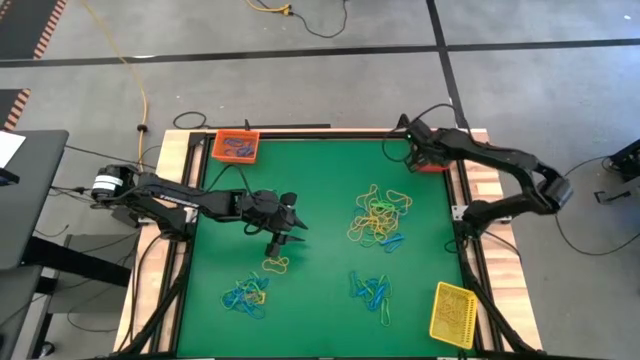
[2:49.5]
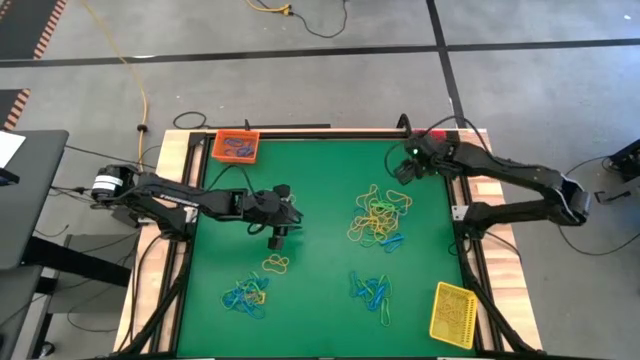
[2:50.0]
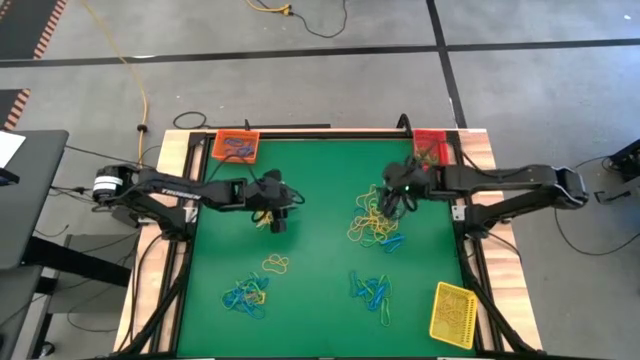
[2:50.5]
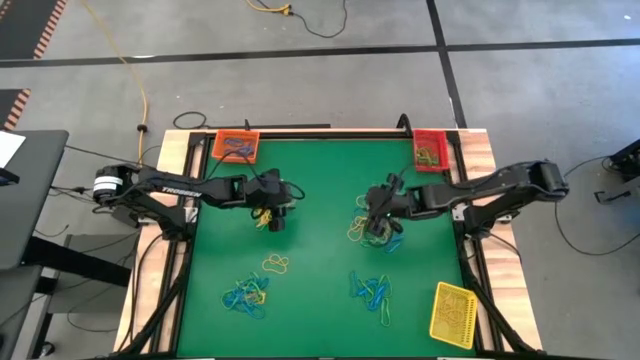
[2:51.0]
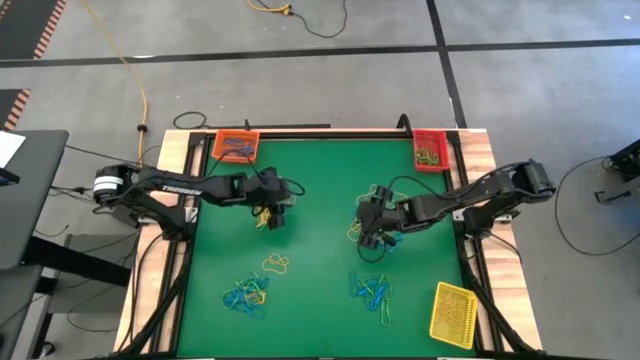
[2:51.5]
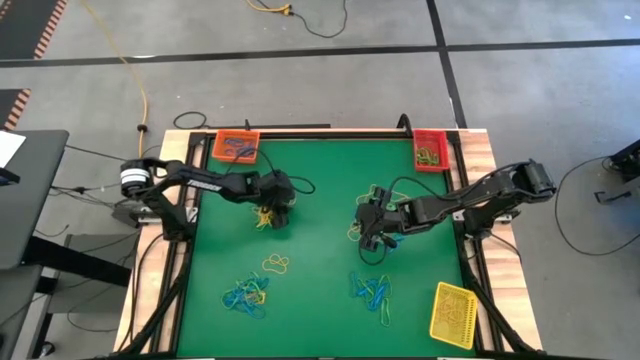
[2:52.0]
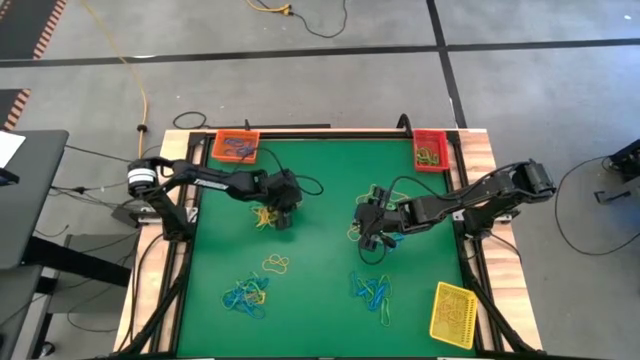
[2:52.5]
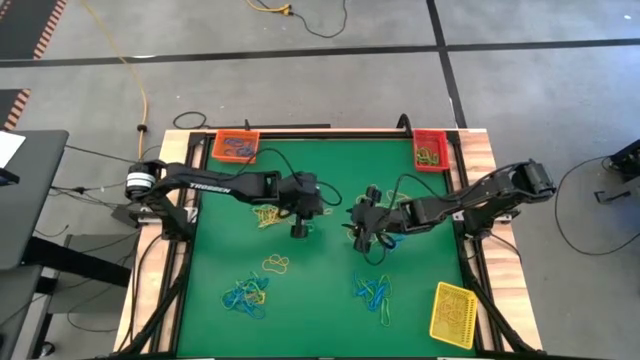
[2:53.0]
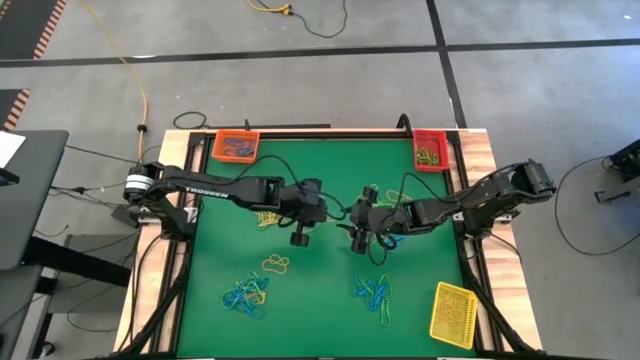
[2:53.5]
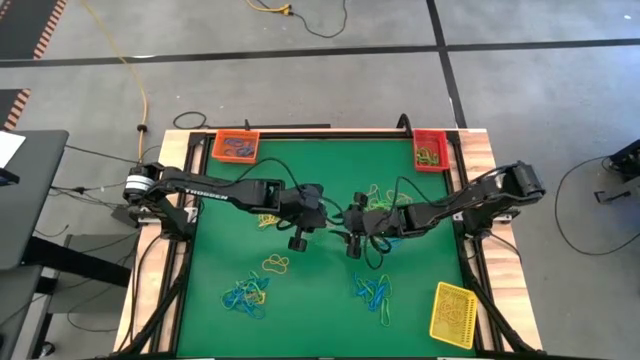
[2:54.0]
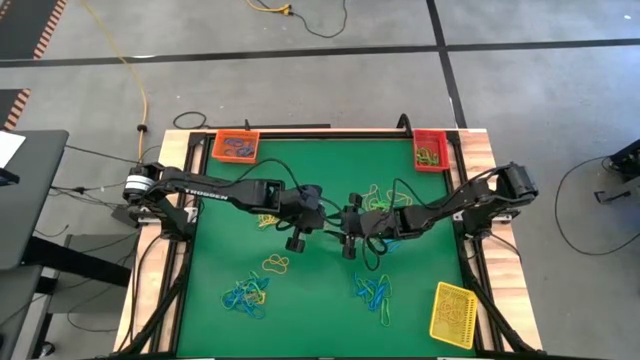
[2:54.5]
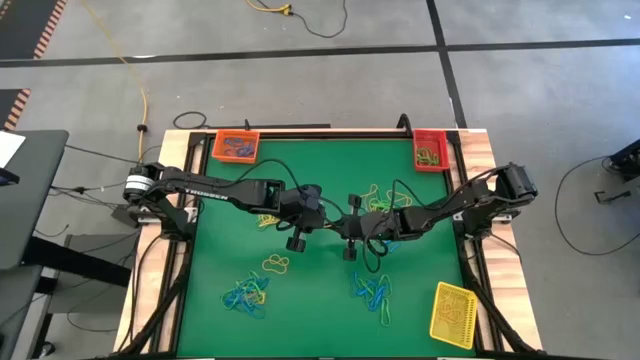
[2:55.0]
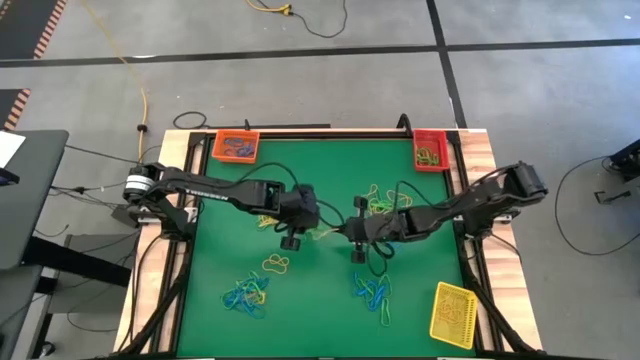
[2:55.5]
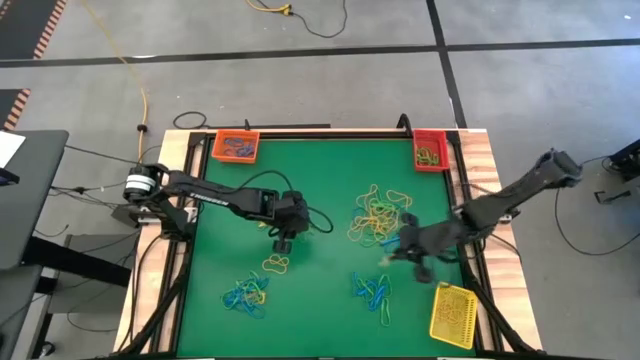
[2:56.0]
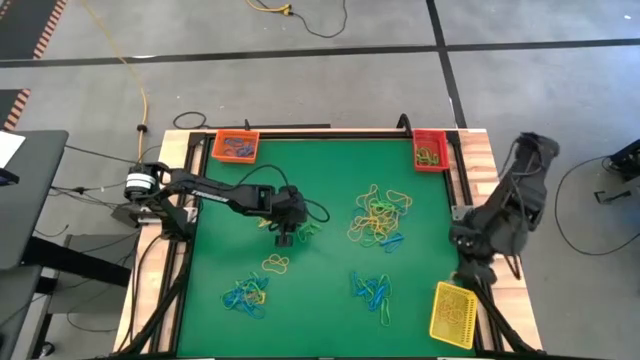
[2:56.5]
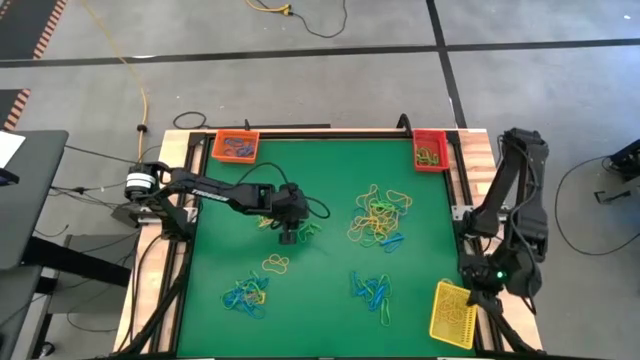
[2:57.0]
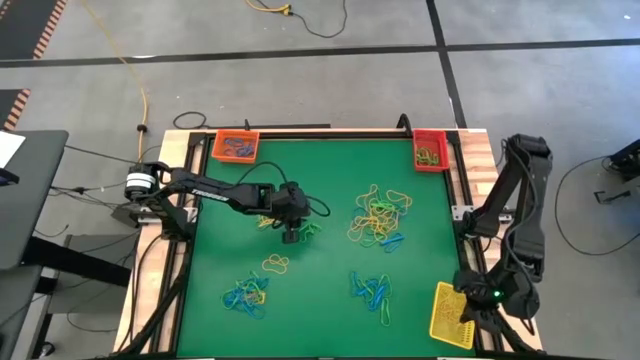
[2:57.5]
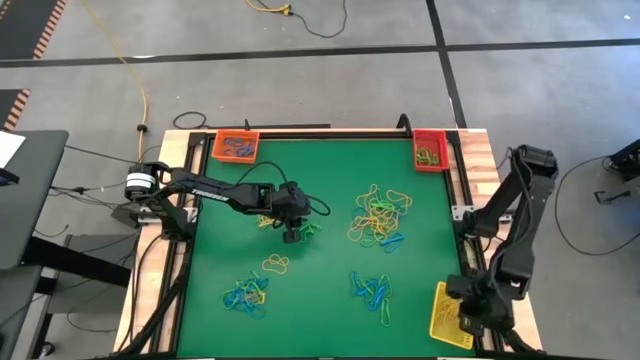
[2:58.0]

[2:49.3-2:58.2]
Task: Sort rubber bands into baskets
Put the top left yellow rubber band into the yellow bin

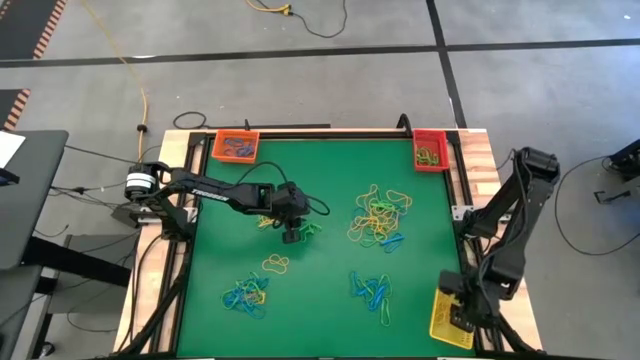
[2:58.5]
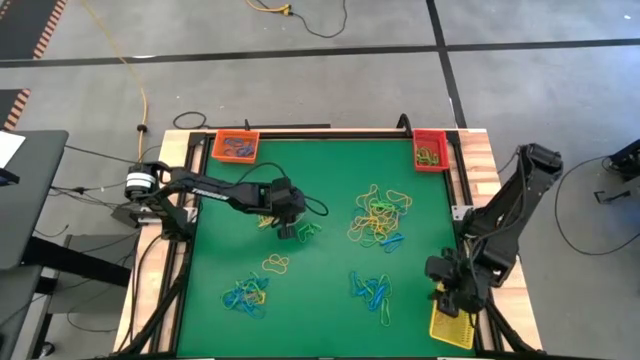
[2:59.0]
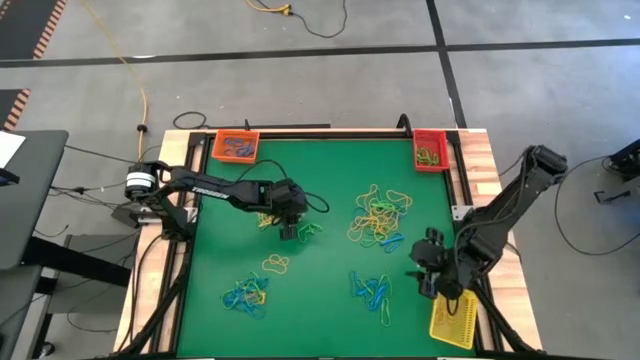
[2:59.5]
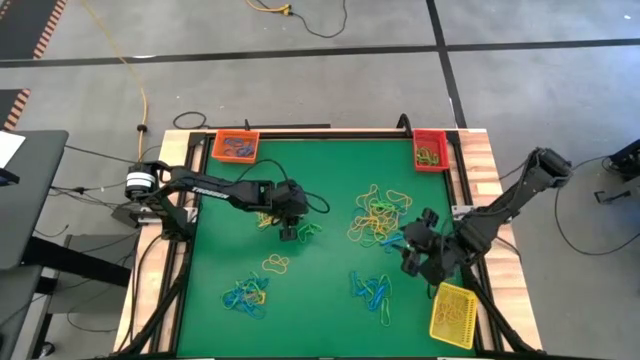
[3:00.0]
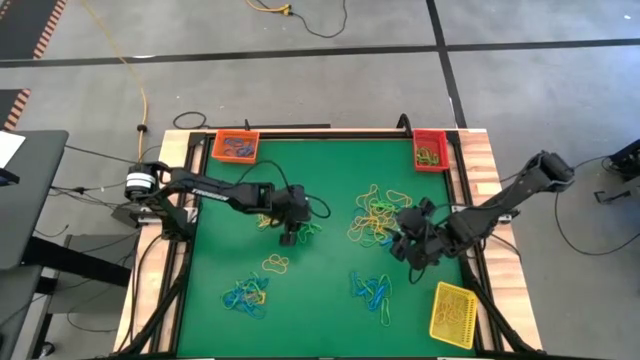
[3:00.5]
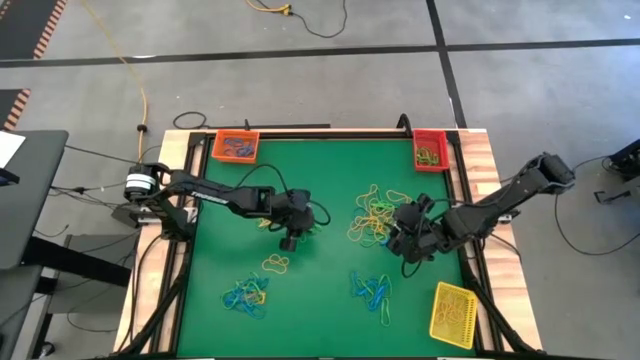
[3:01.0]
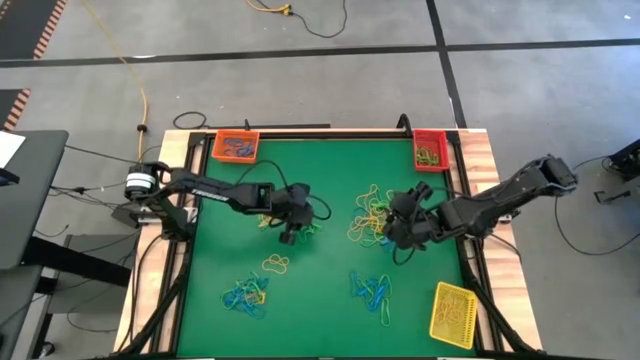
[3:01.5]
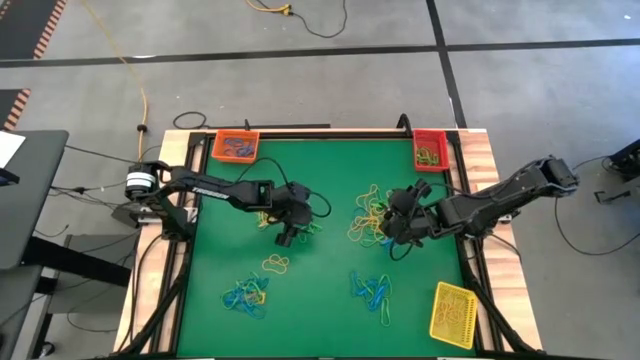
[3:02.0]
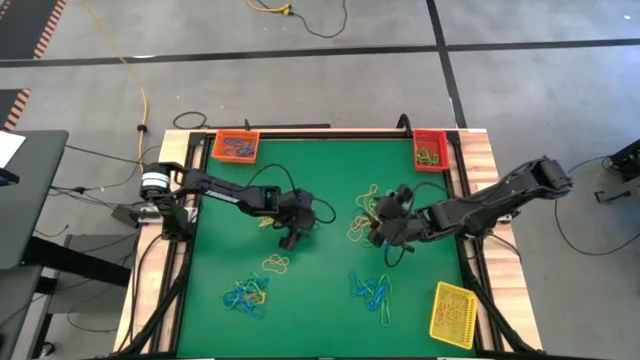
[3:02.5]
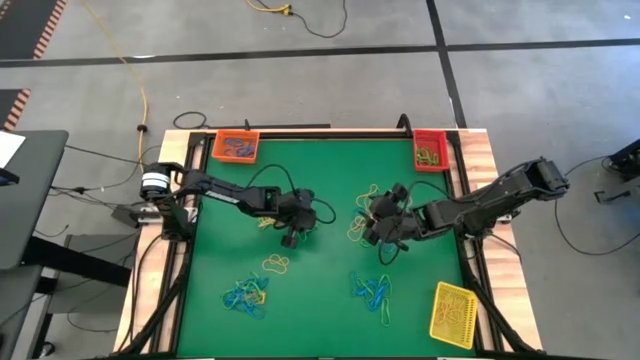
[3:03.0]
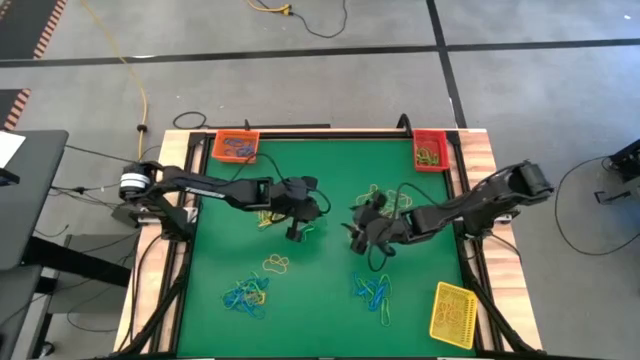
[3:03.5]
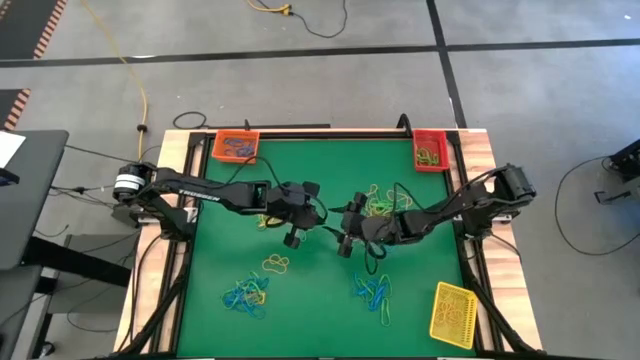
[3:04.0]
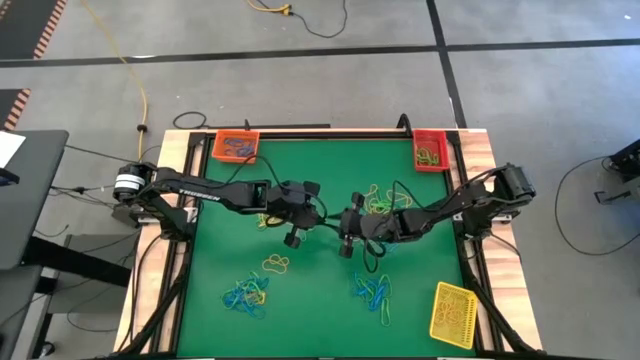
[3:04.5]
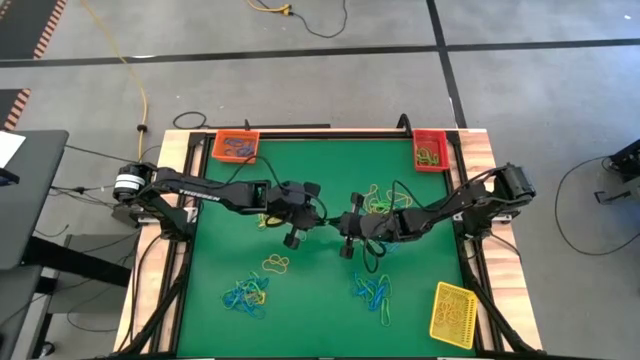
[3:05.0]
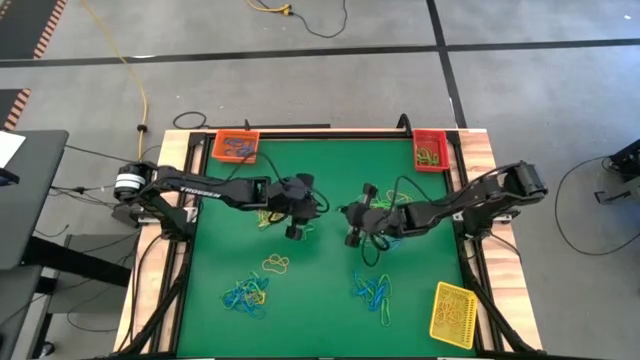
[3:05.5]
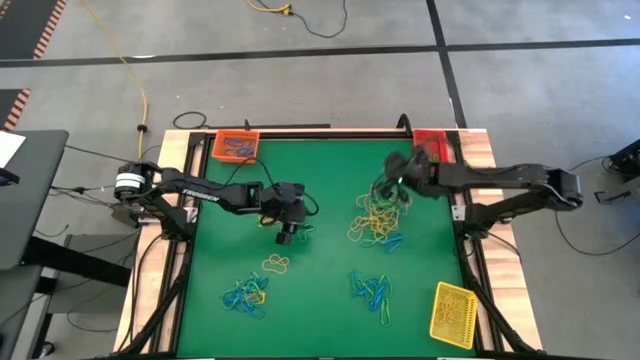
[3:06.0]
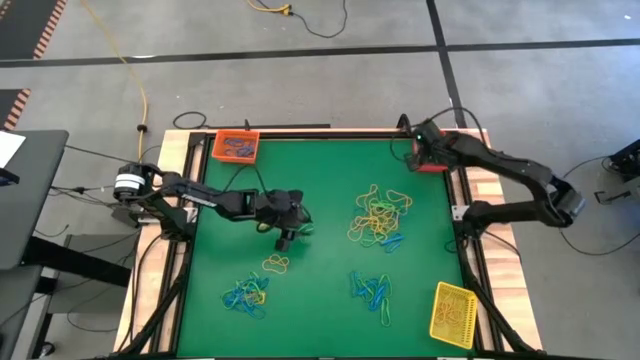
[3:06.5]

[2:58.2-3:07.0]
Put the top left green rubber band into the red bin

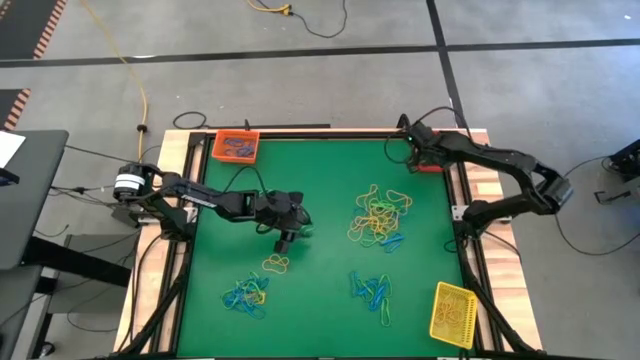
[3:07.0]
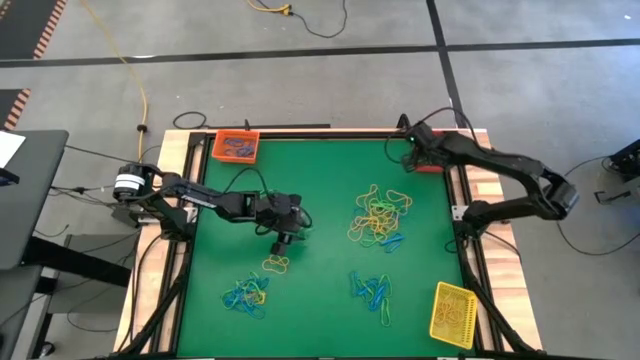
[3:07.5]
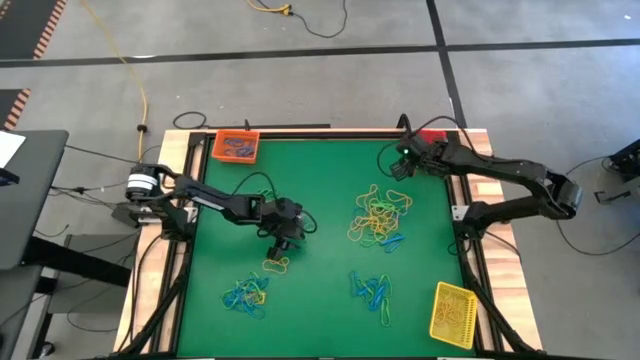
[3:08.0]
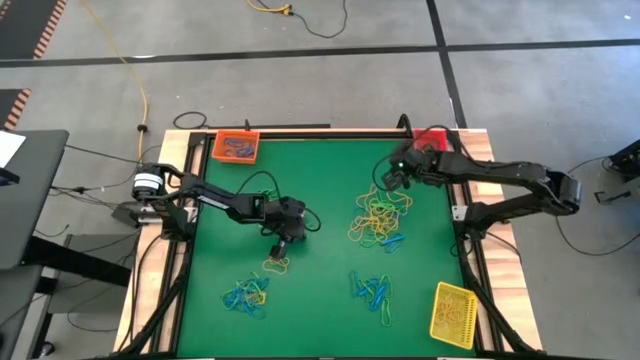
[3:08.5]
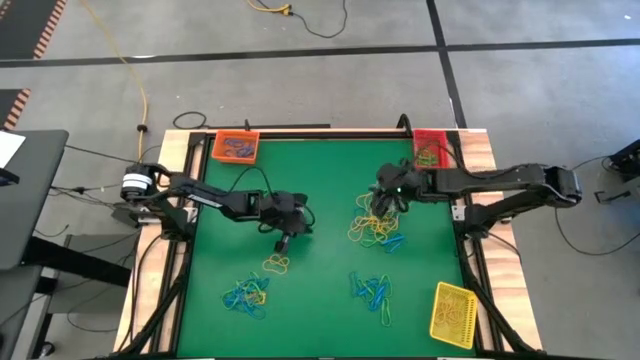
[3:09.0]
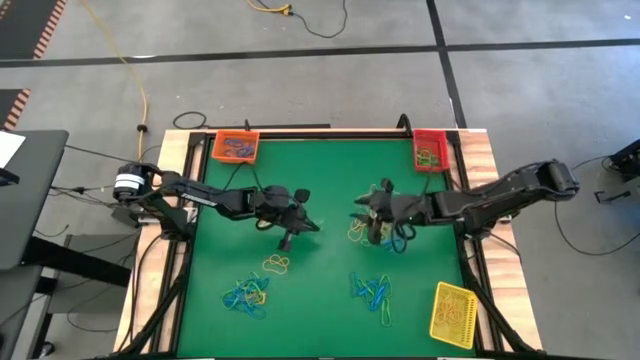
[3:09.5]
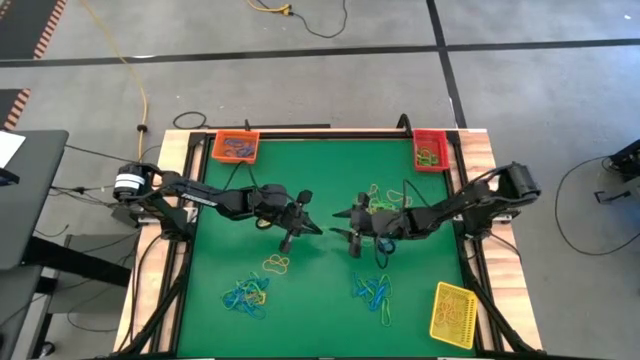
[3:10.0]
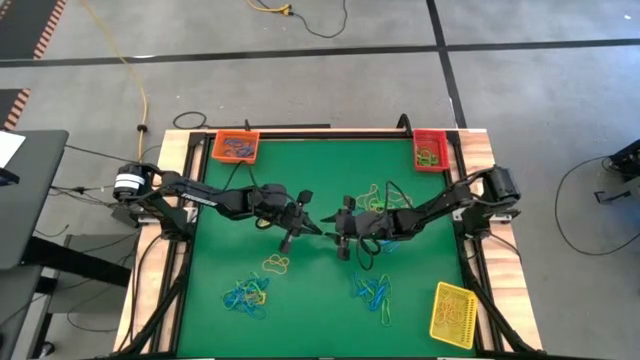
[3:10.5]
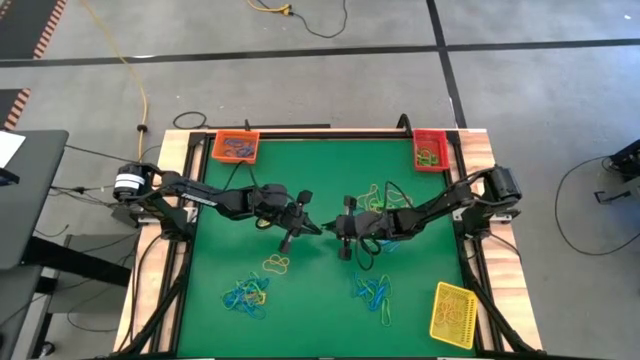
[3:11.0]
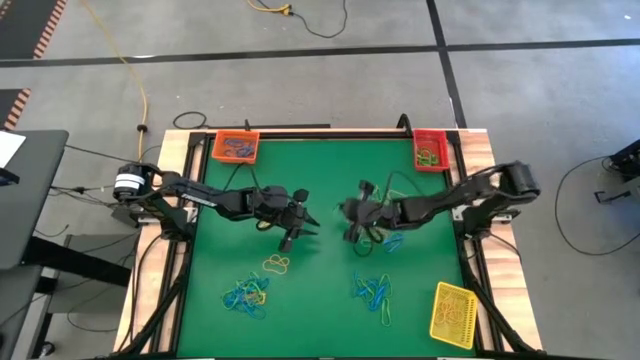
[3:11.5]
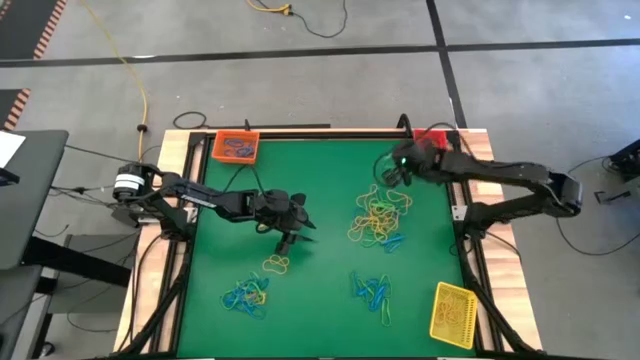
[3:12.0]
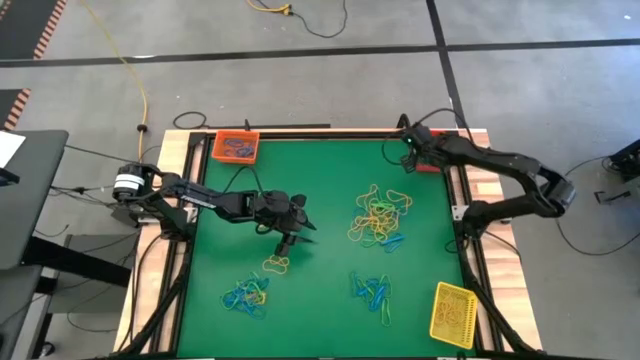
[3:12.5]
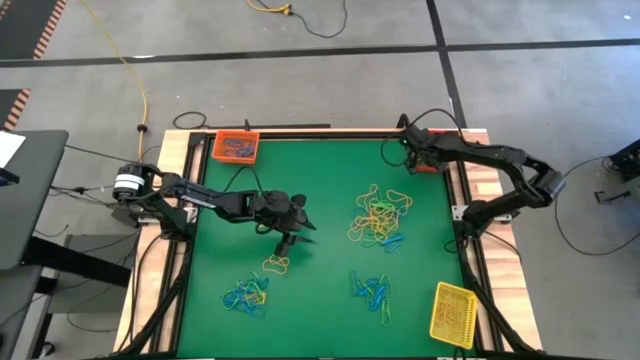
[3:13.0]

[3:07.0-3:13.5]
Put the top left green rubber band into the red bin
